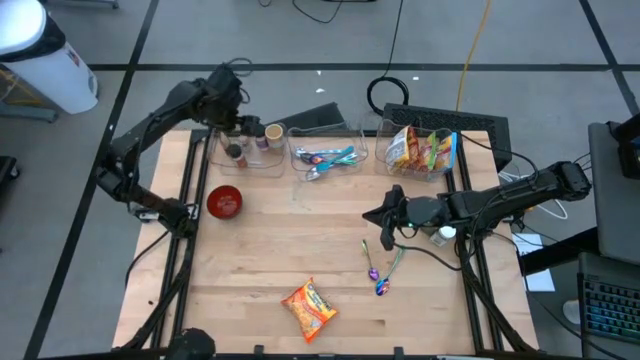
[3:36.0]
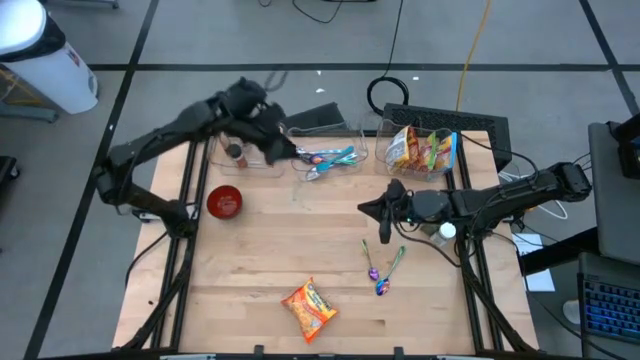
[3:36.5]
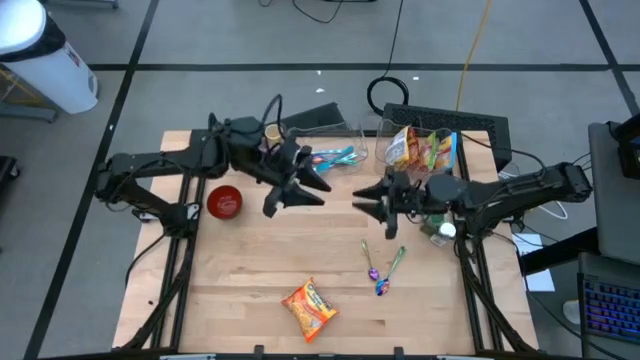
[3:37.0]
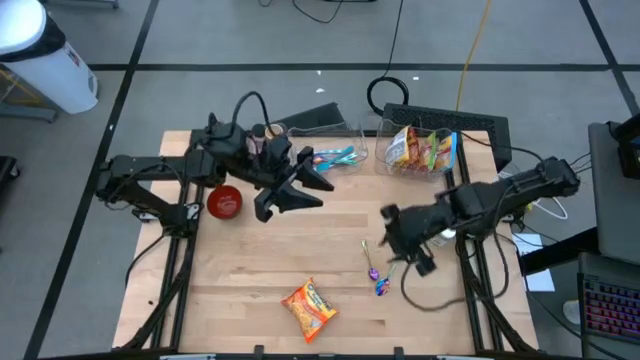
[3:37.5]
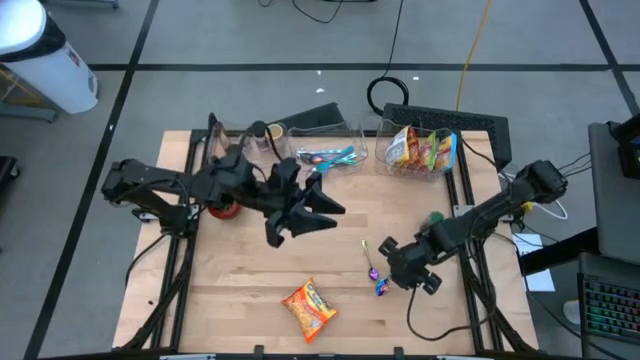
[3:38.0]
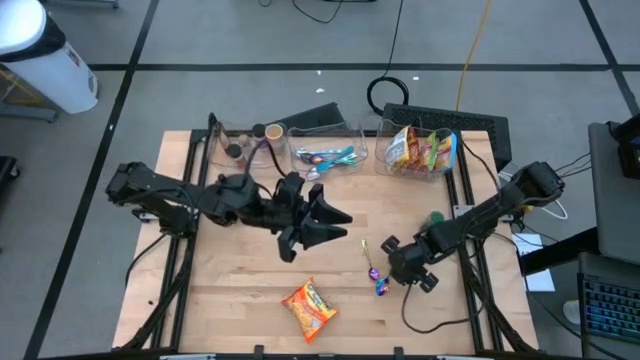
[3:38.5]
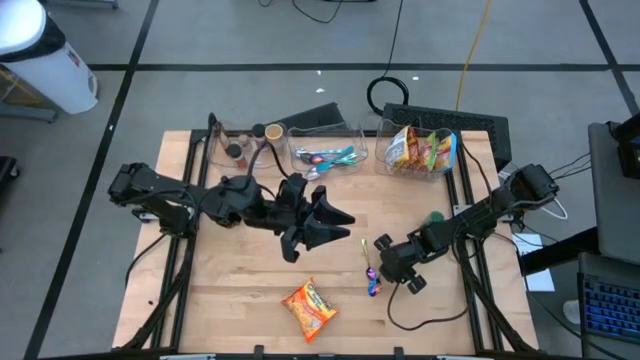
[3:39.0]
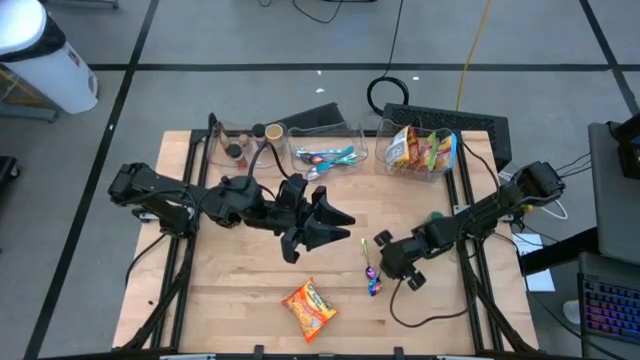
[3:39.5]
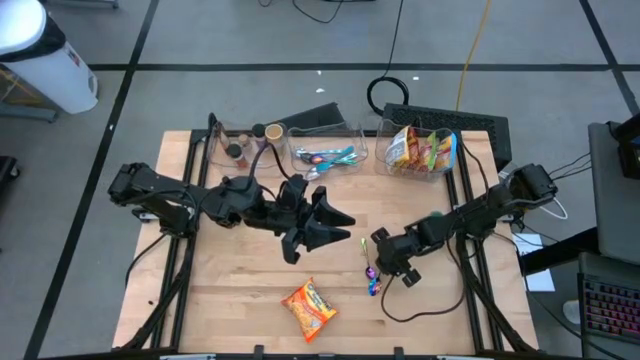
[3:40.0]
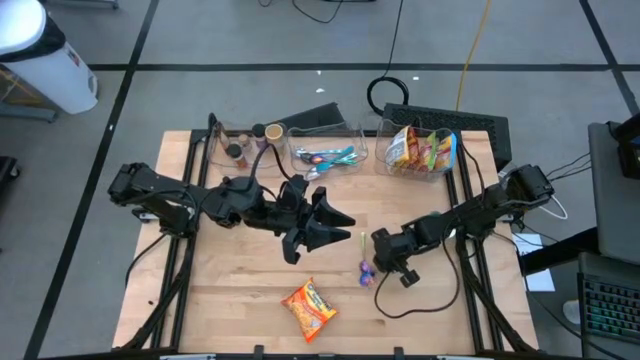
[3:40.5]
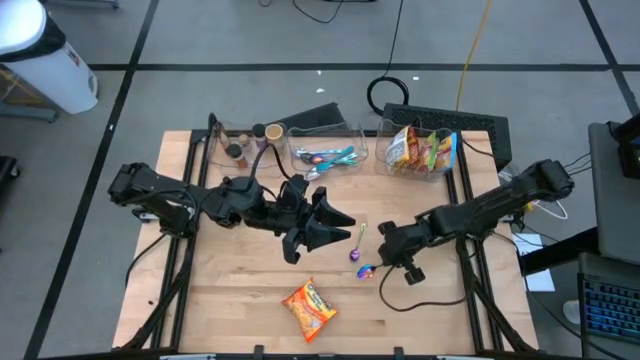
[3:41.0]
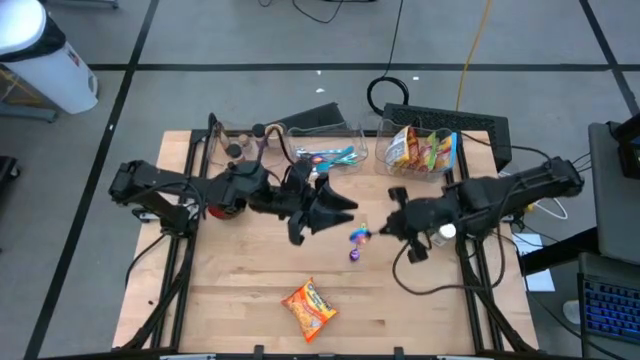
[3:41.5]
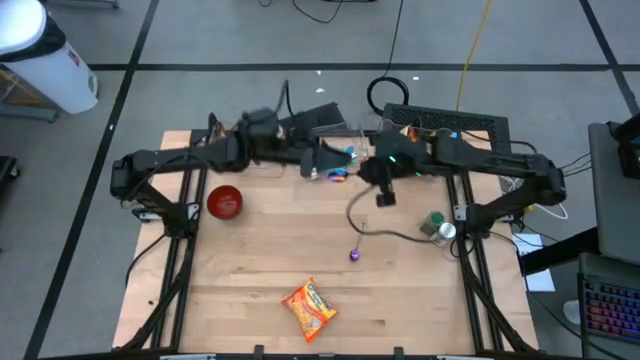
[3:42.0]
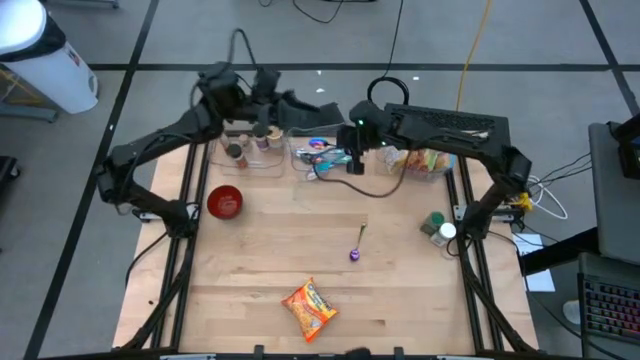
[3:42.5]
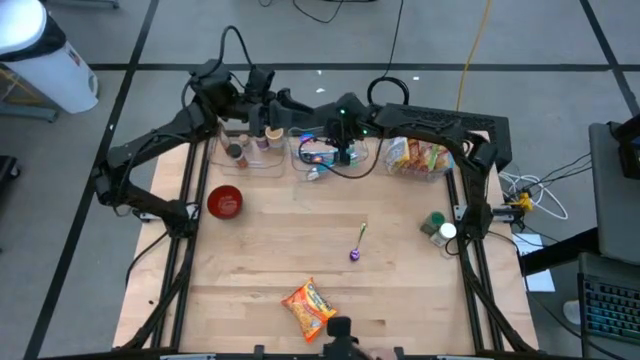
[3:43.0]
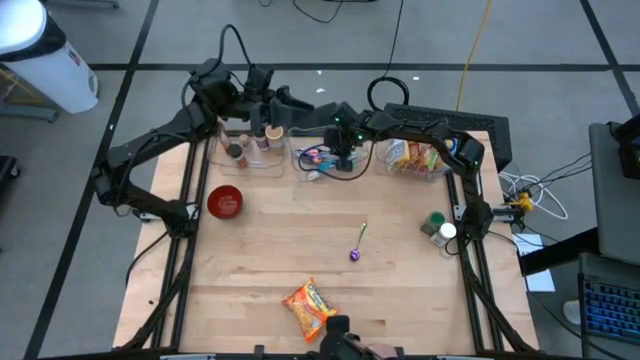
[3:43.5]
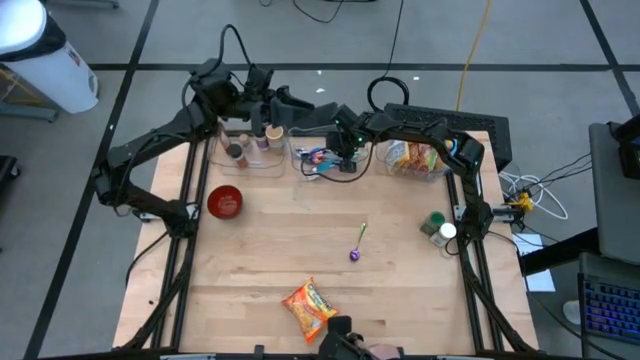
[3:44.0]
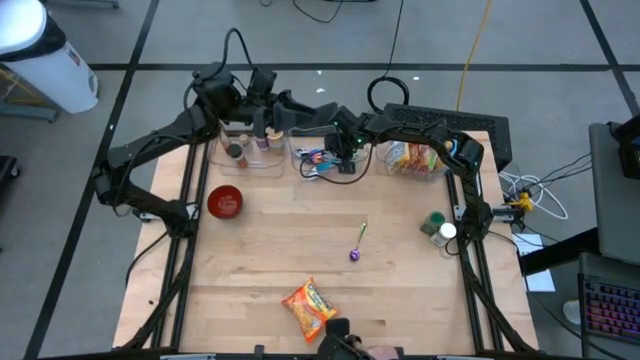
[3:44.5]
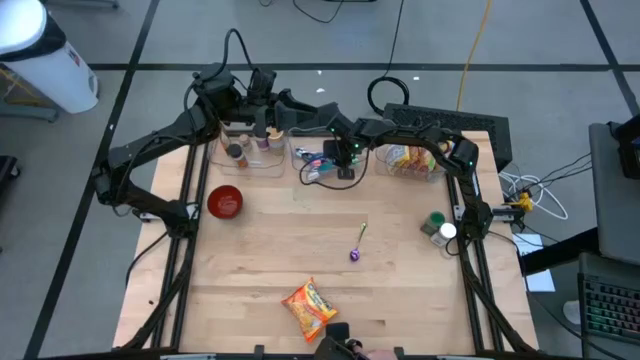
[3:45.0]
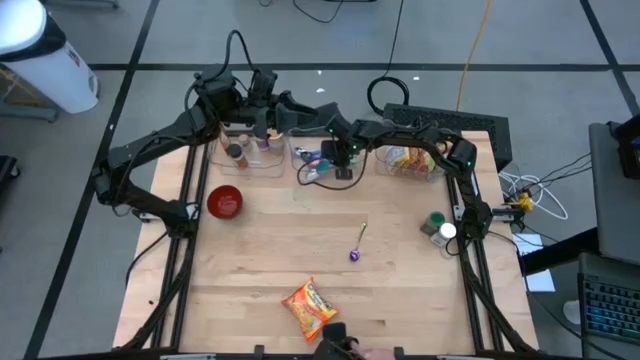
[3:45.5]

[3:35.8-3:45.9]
Task: Pick & Place Food Item
Put the right blue spoon into the middle transparent bin

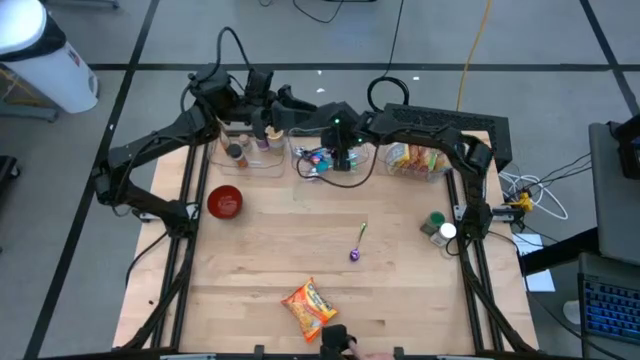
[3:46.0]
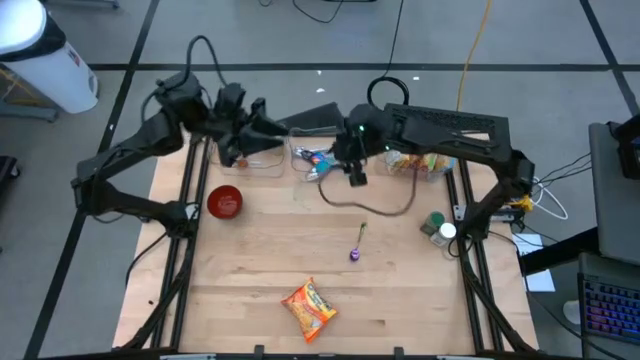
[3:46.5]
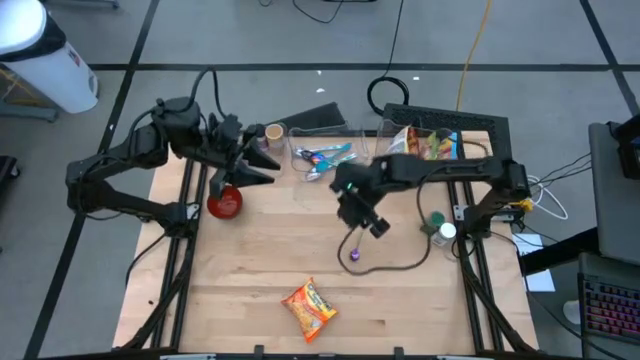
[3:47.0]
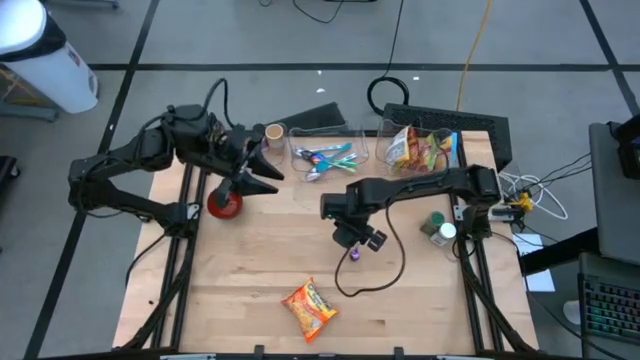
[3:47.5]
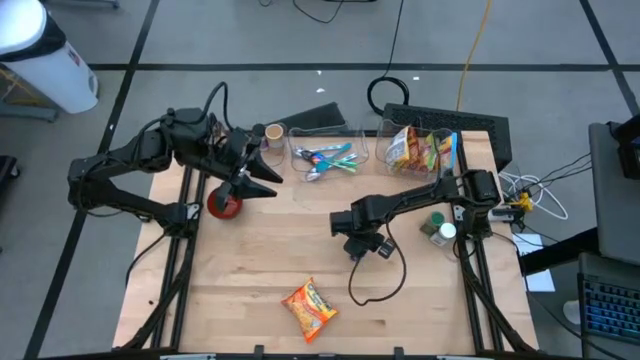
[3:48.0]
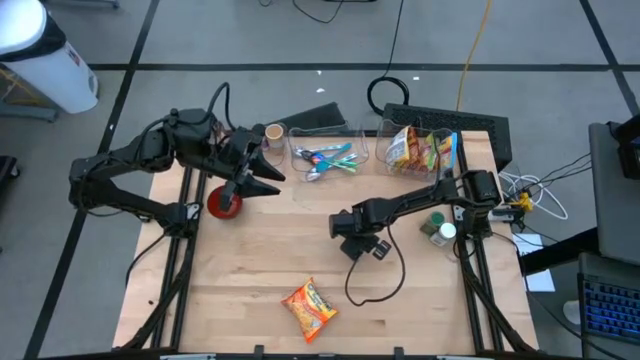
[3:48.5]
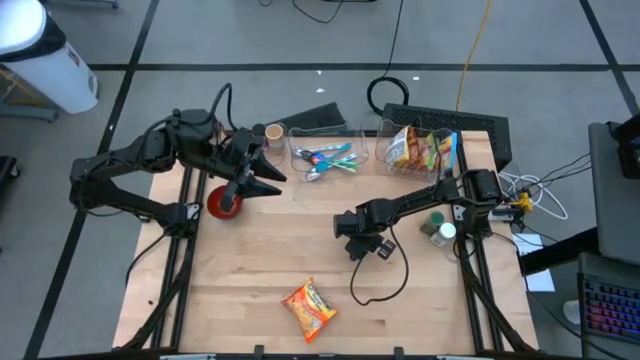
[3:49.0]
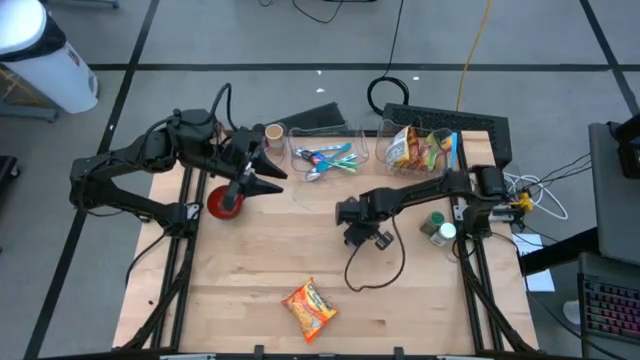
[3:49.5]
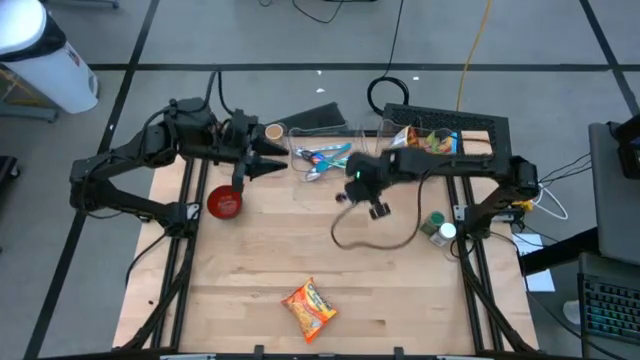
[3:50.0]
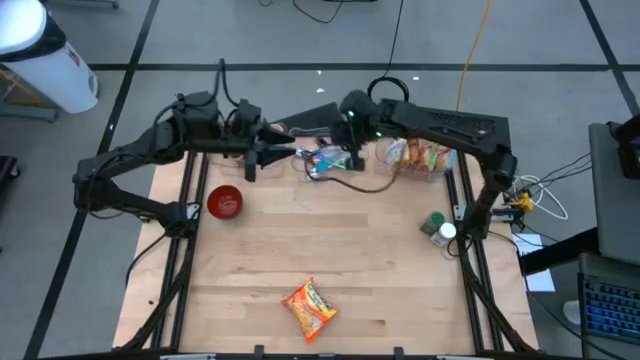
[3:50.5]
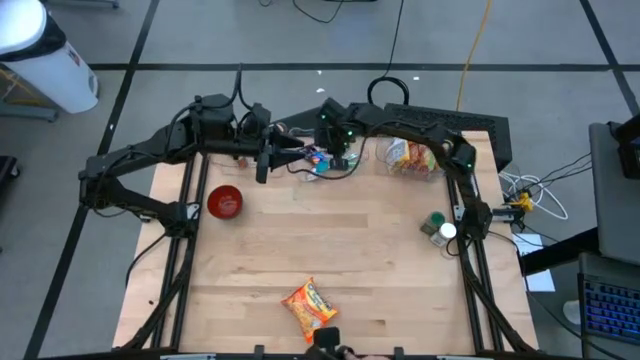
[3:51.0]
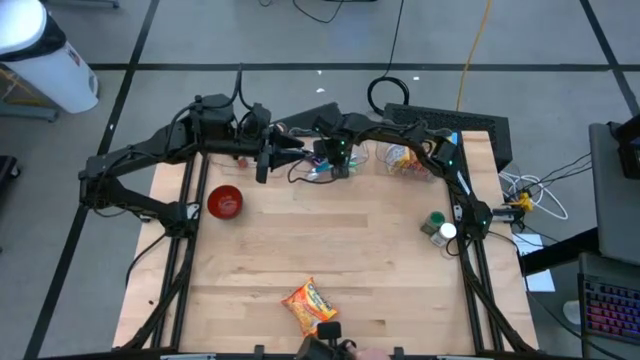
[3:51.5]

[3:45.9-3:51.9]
Put the blue spoon into the middle transparent bin

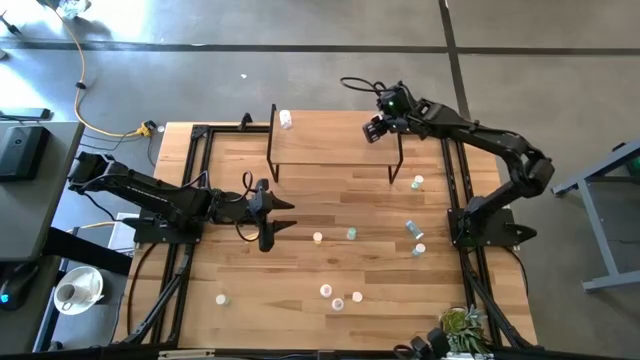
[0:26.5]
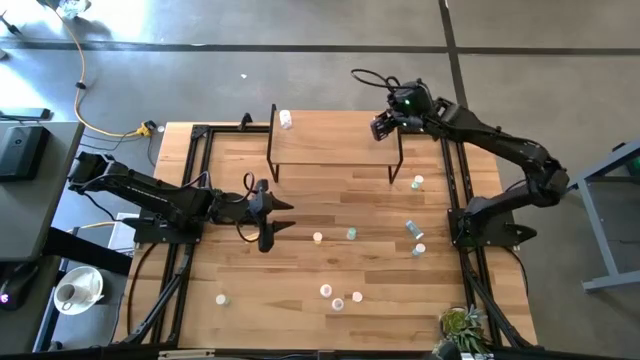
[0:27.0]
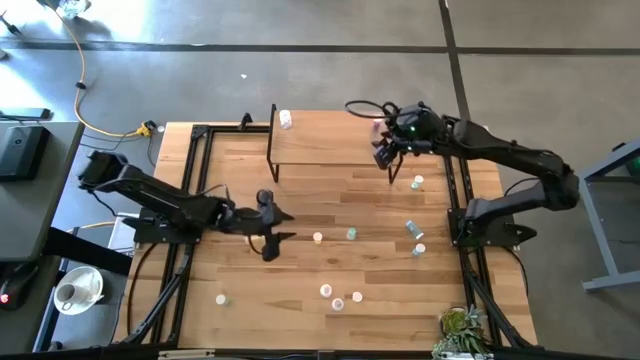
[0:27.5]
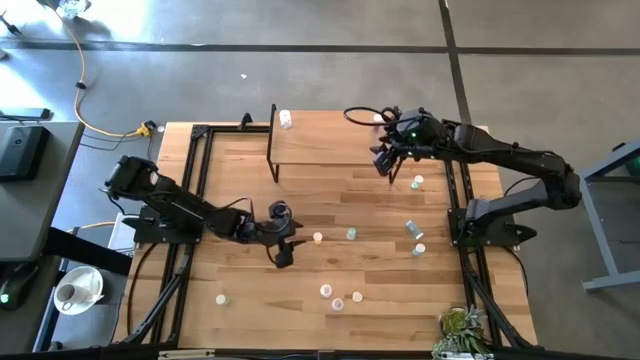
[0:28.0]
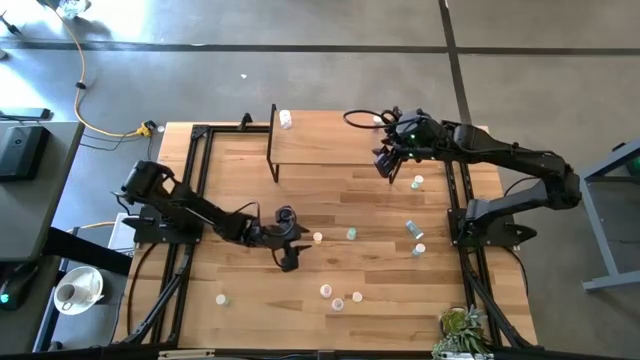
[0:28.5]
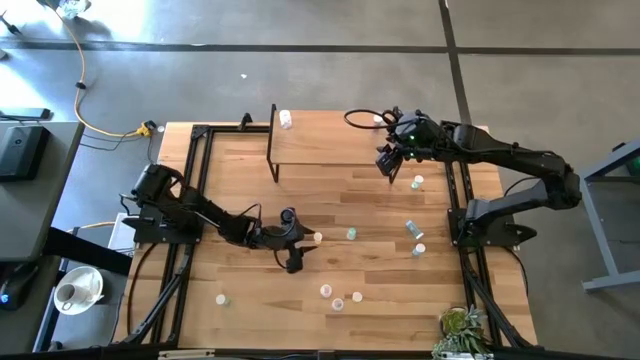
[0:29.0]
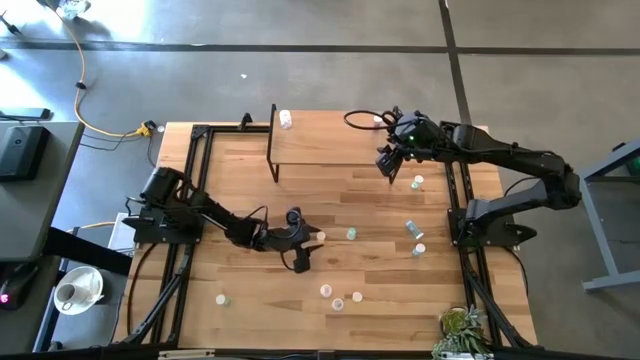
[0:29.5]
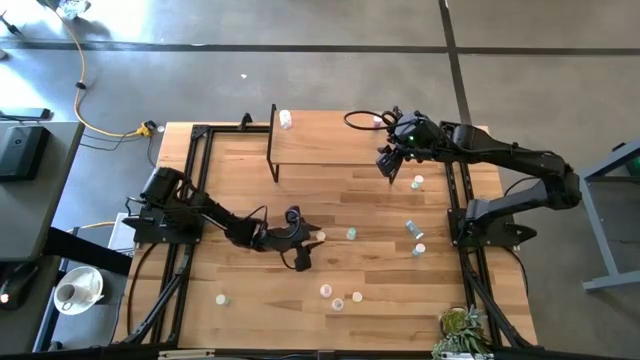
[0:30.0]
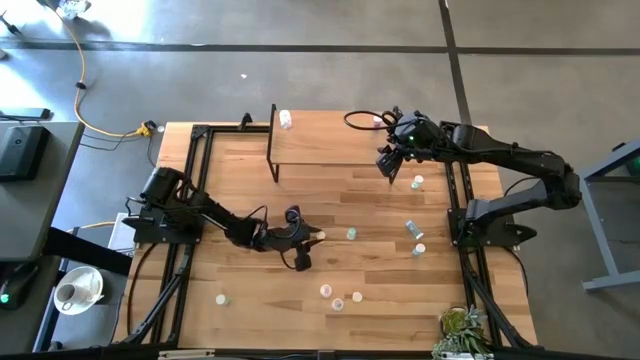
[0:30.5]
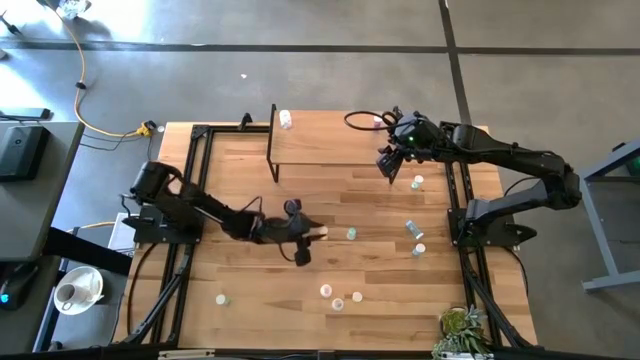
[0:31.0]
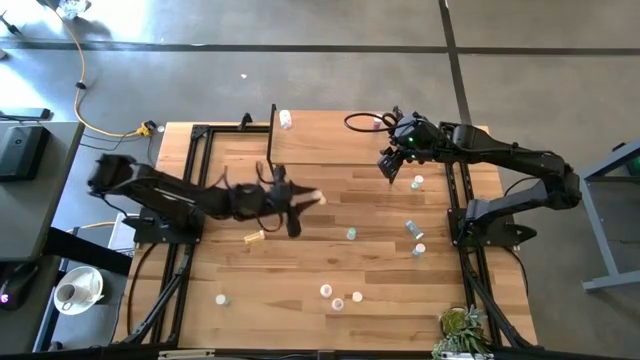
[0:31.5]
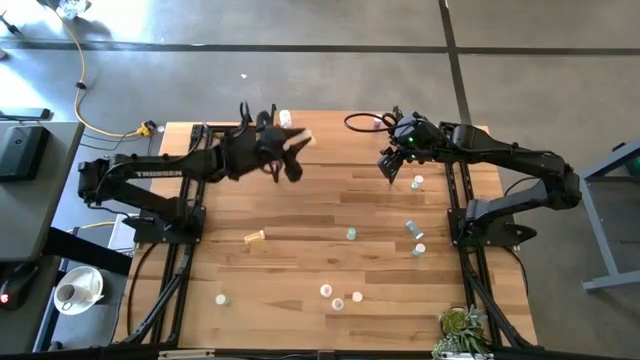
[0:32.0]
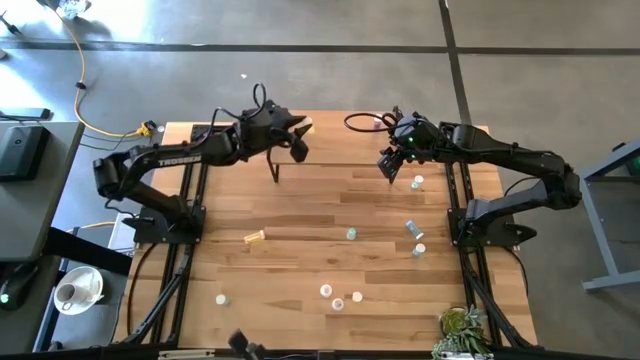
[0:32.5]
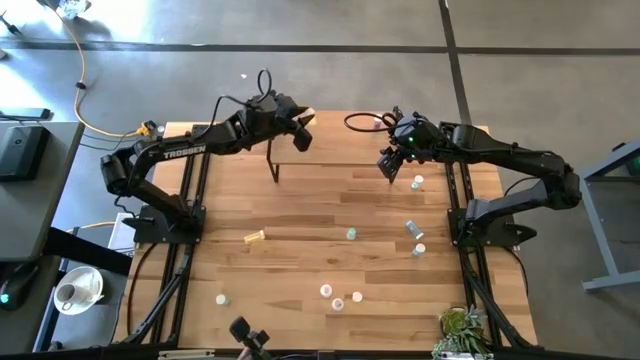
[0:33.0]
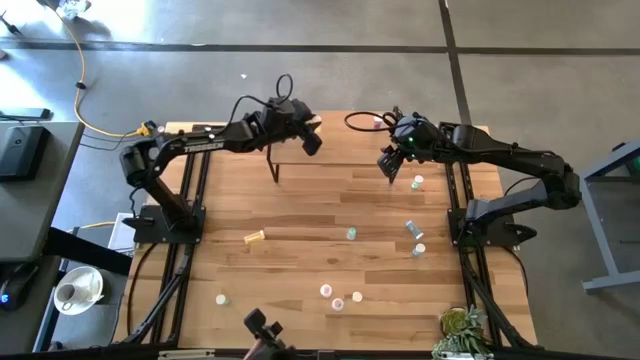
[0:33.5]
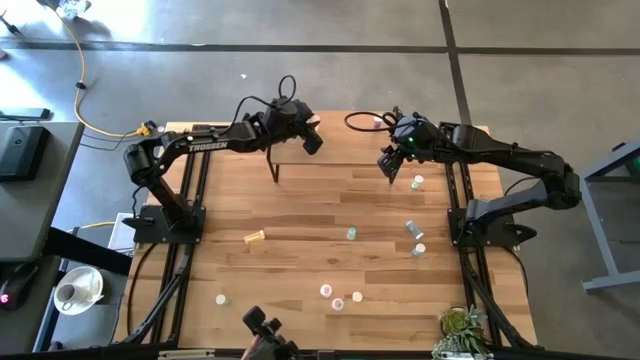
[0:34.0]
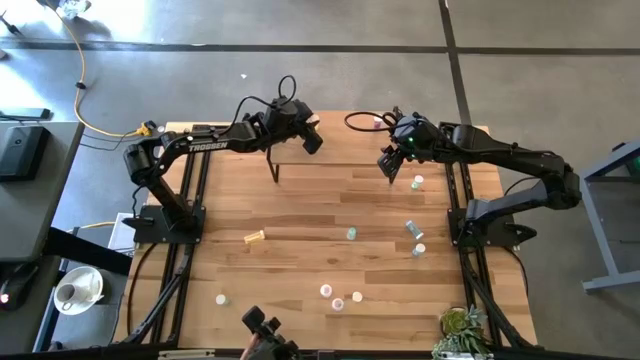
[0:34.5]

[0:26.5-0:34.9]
Task: Pick and place medicine bottles onto shelf by color
Put the top right yellow pill bottle on the shelf
